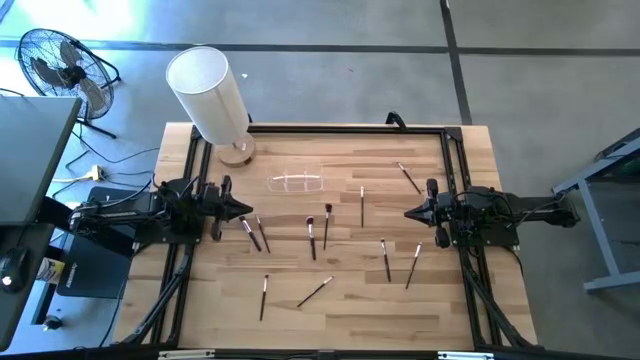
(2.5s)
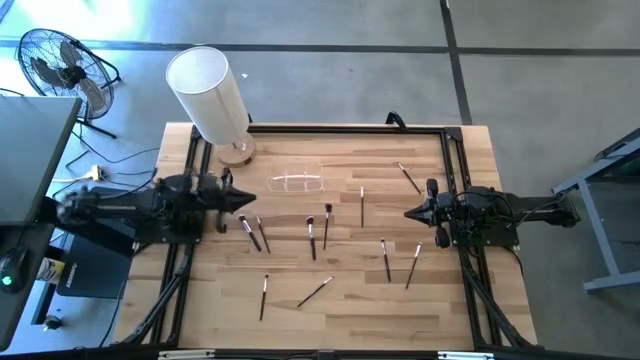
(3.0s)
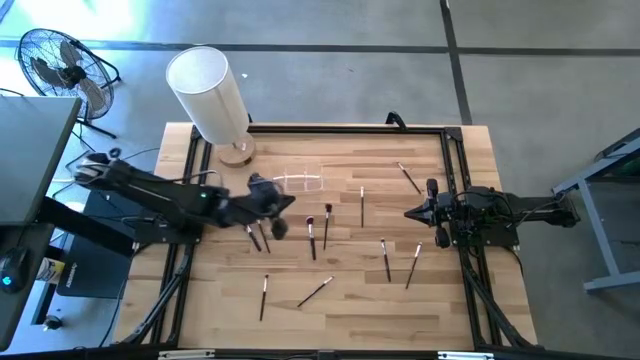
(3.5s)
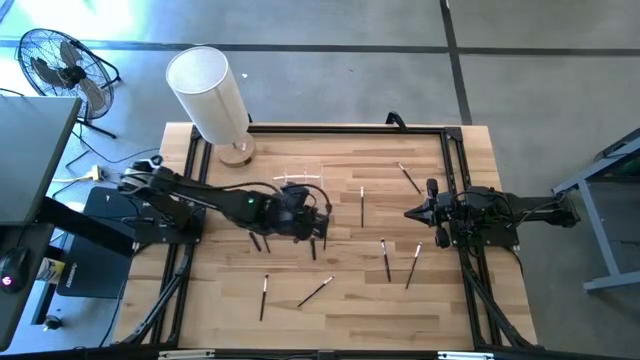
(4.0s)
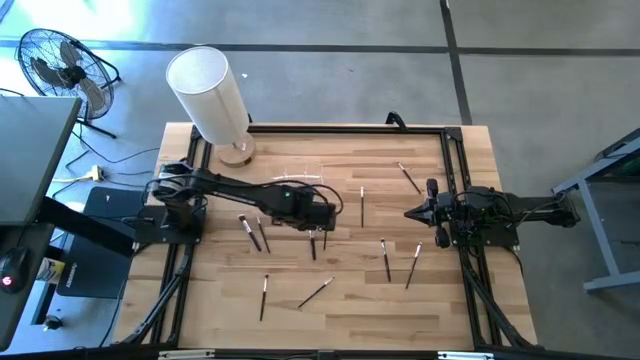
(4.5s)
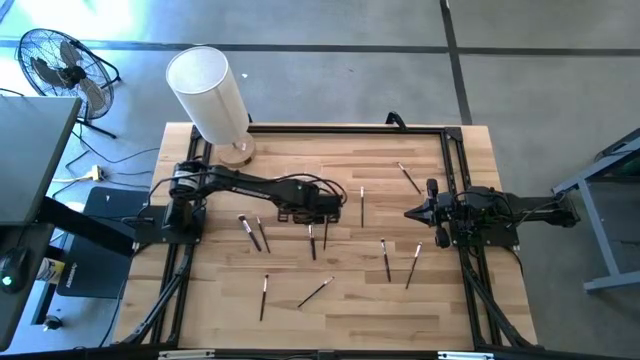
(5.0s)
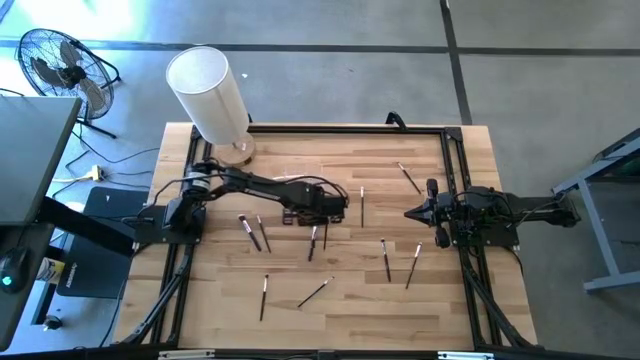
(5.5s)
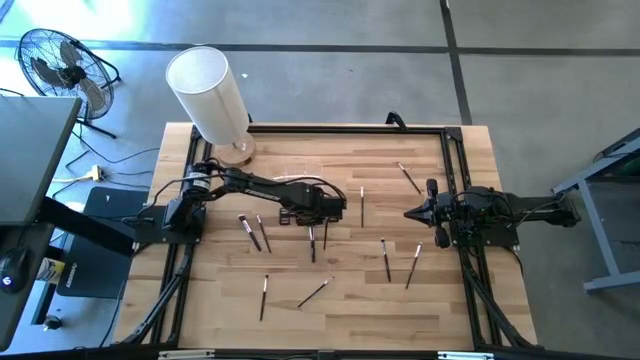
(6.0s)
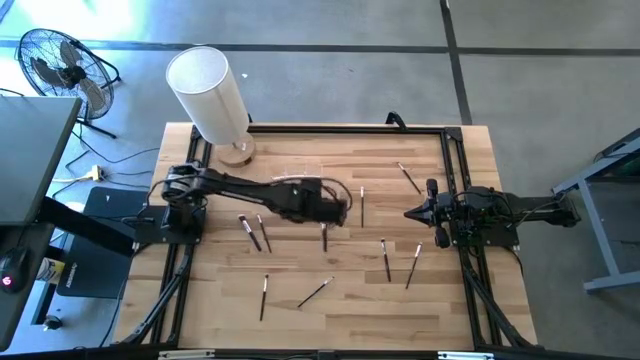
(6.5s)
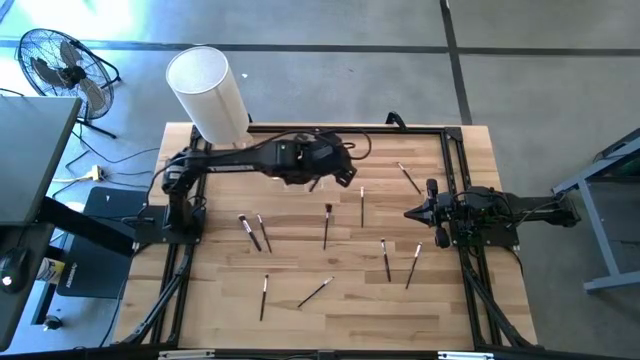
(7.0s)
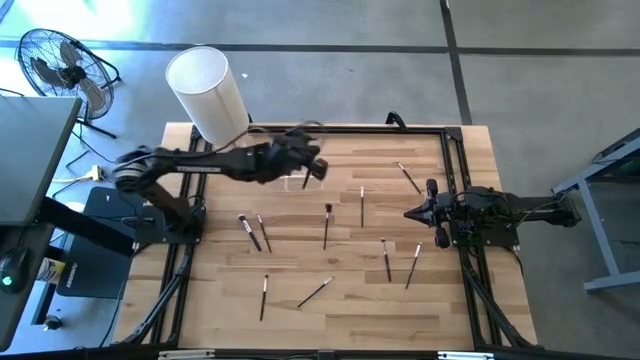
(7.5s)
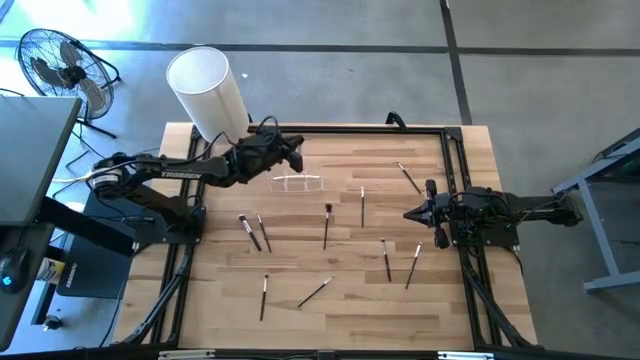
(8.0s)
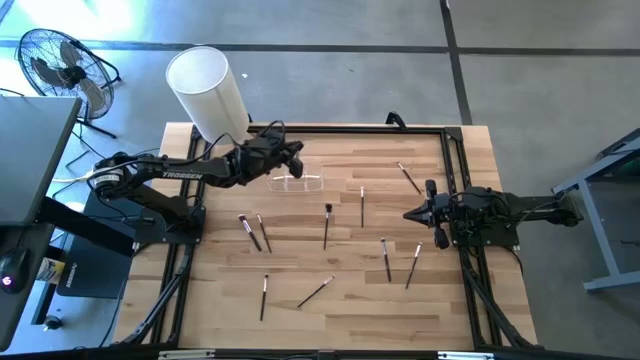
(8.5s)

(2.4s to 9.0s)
Task: Pick & Place Makeup Supplies
Put the black makeup brush into the transparent organizer

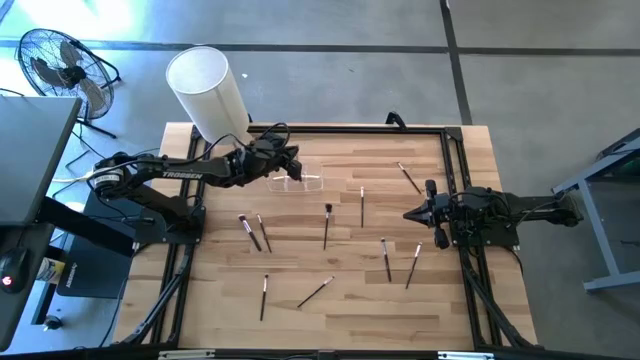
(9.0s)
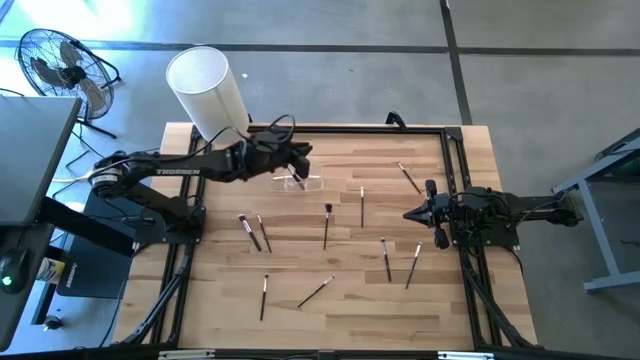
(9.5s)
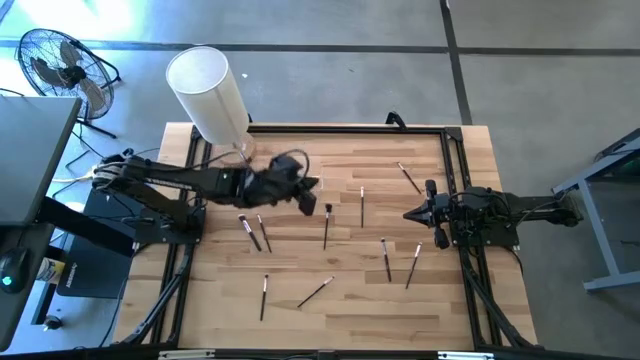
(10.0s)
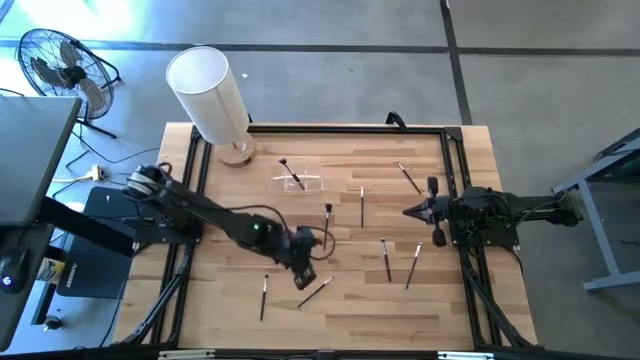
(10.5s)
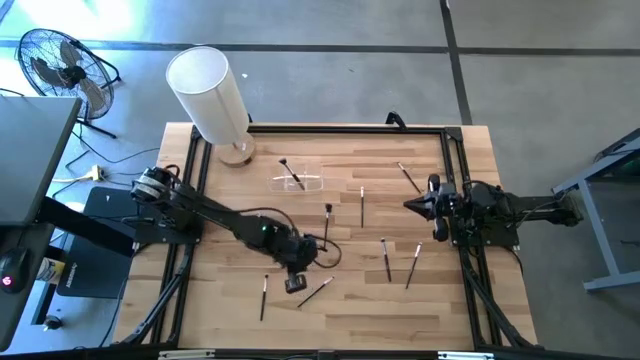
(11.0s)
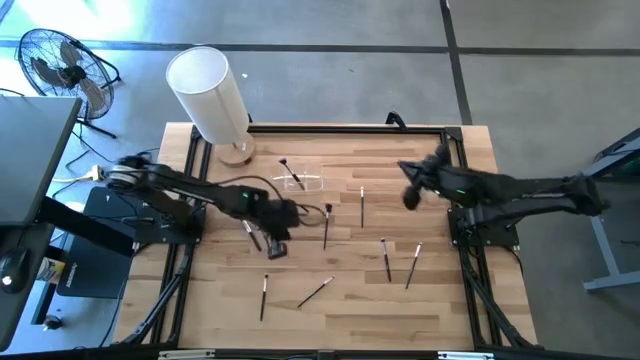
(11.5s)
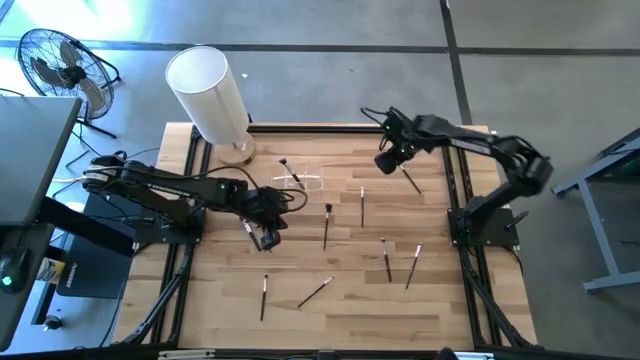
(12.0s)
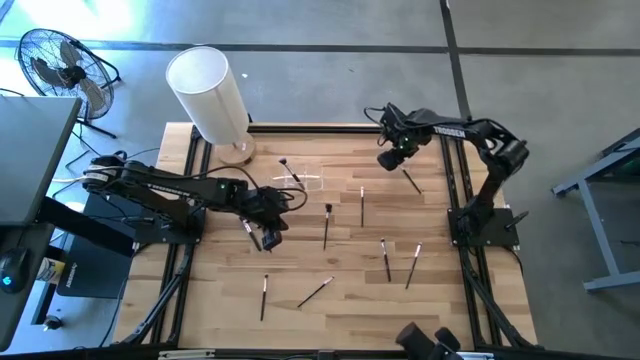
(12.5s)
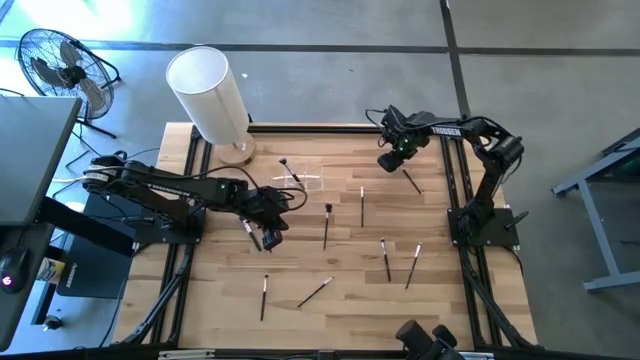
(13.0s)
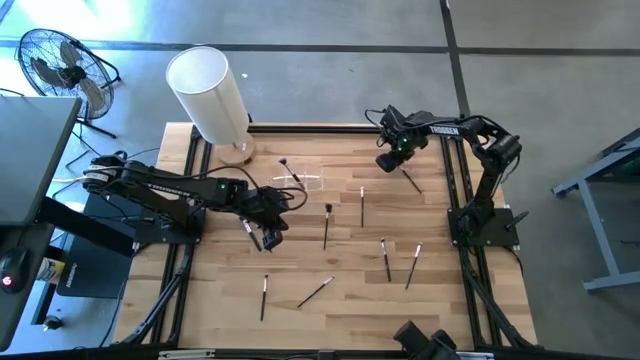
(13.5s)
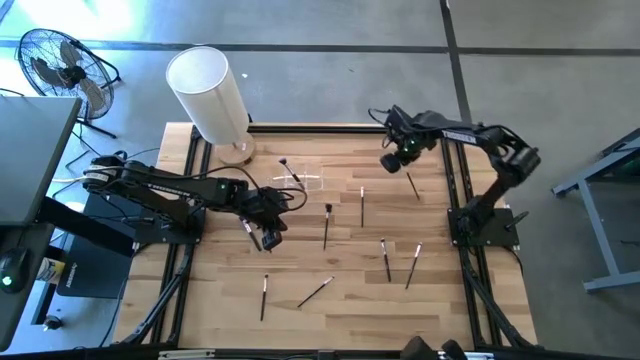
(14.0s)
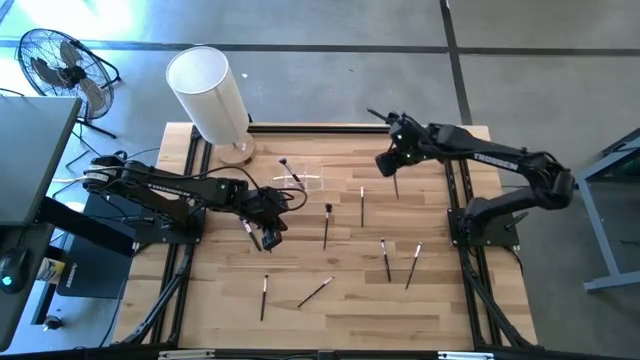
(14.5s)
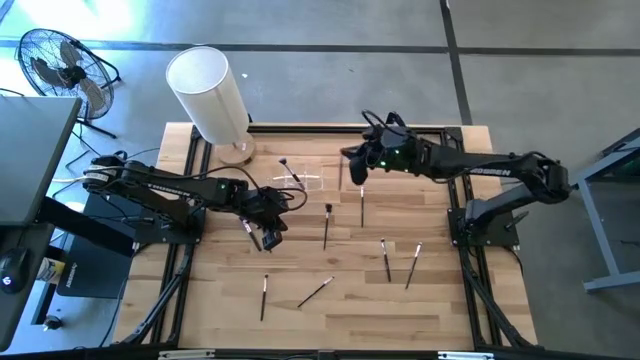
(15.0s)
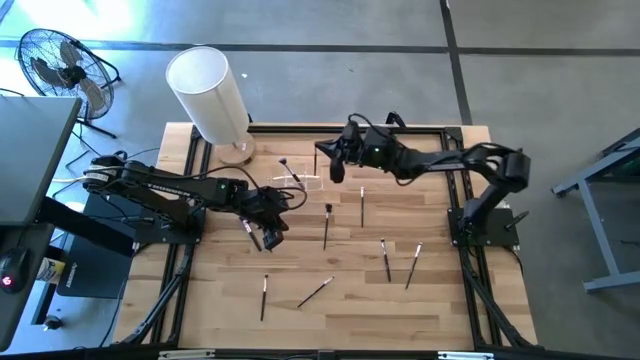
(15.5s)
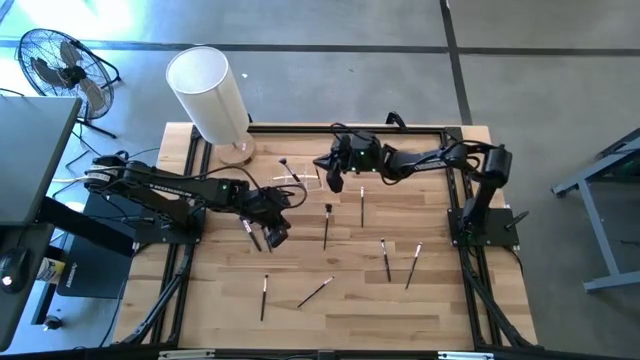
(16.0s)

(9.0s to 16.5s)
Put the black makeup brush into the transparent organizer

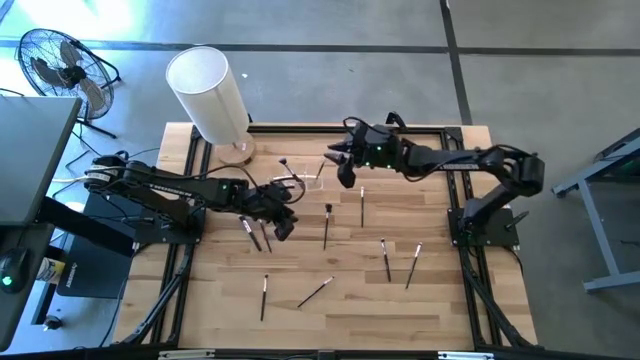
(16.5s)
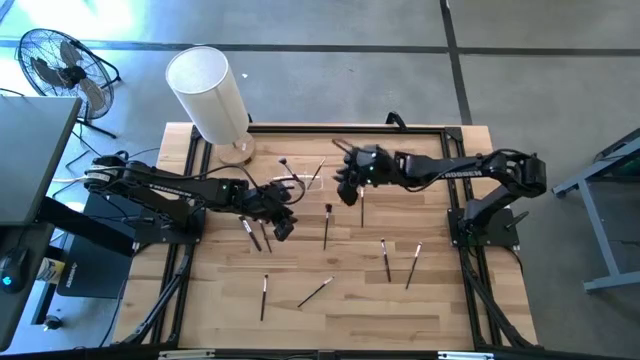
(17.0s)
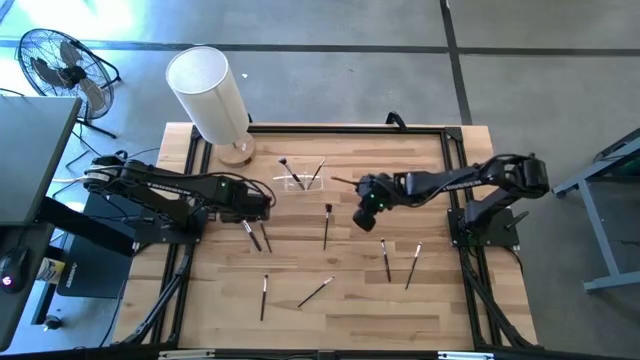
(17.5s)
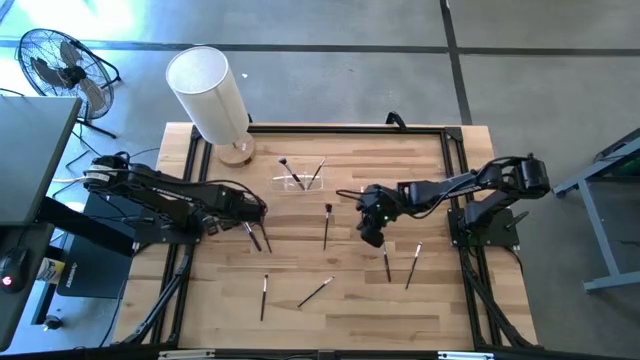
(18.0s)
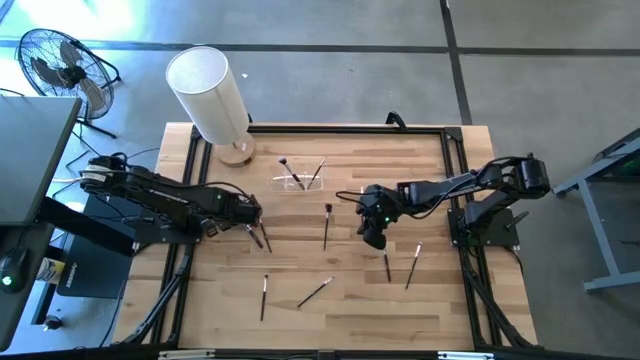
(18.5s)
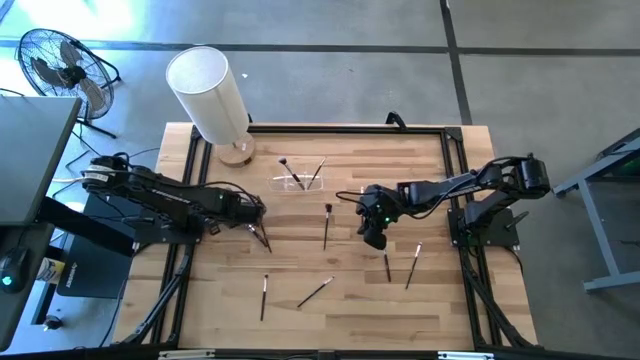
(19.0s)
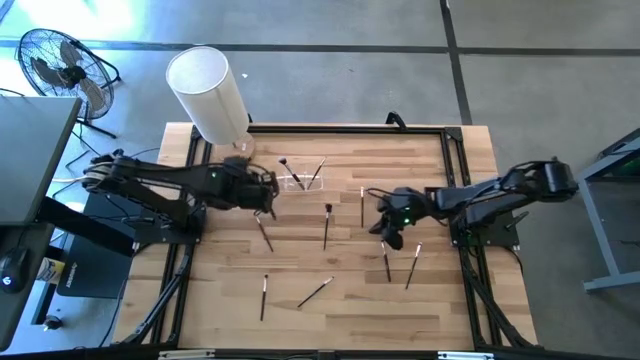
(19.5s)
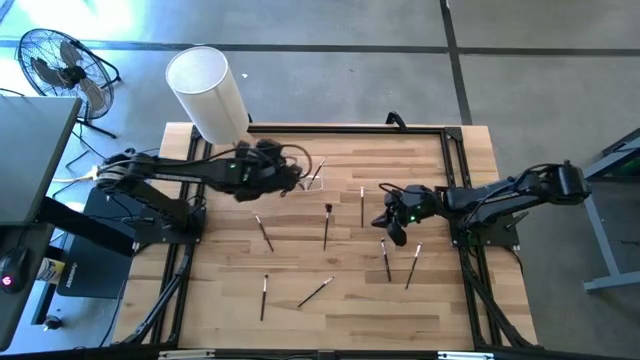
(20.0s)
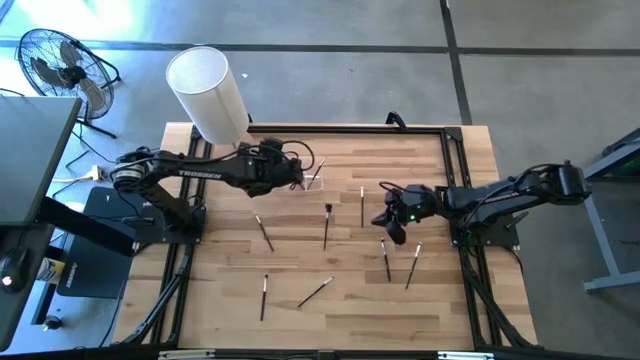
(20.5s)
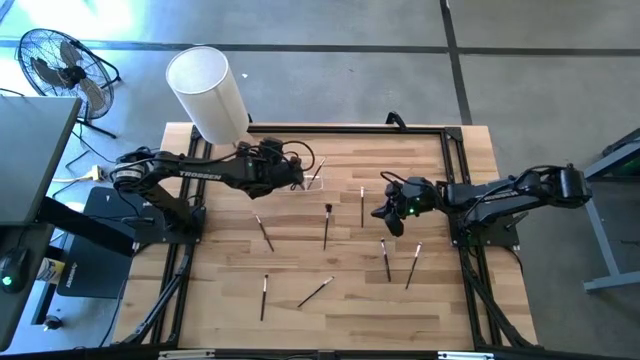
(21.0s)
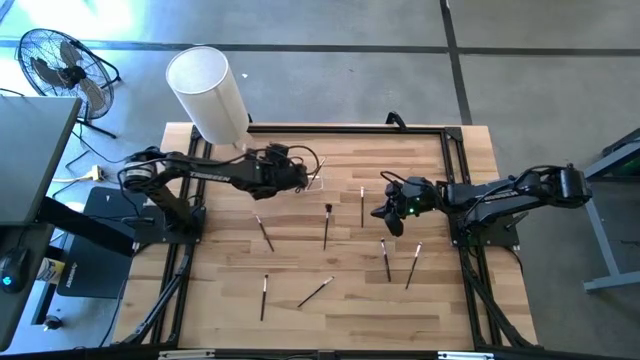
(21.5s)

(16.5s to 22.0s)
Put the black makeup brush into the transparent organizer

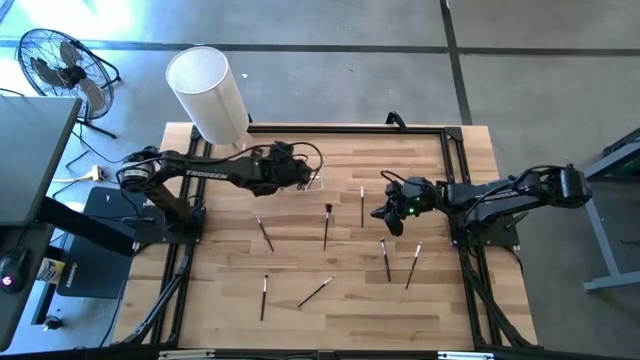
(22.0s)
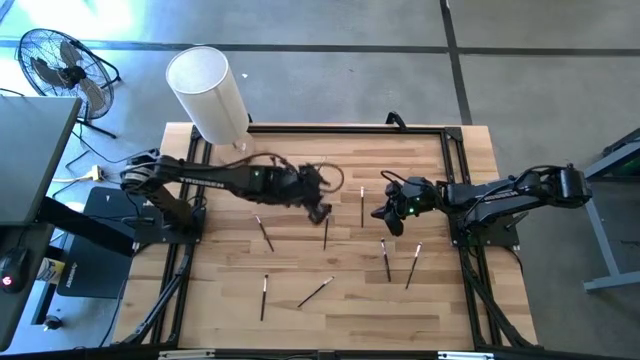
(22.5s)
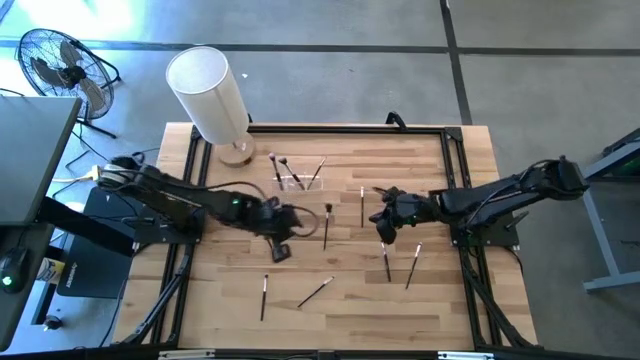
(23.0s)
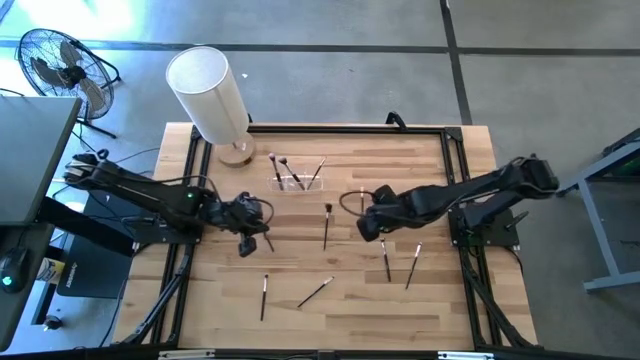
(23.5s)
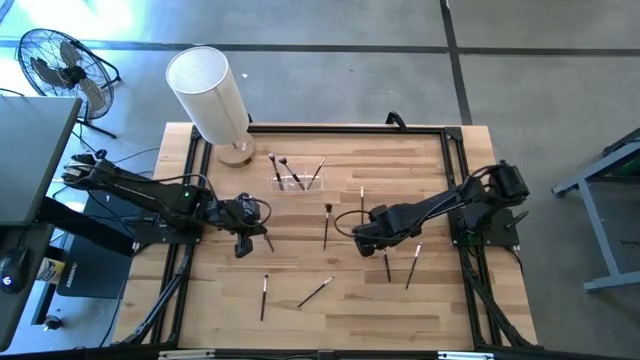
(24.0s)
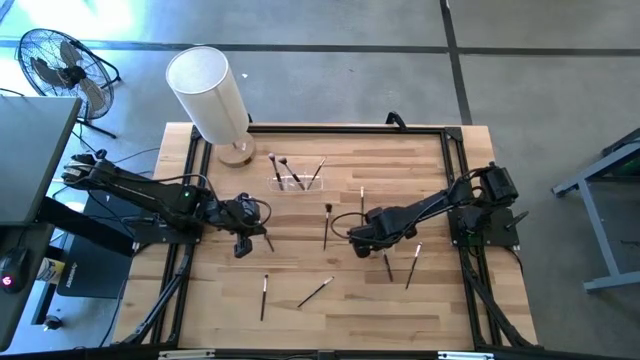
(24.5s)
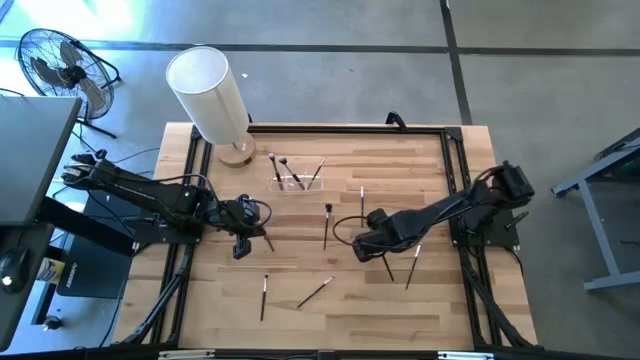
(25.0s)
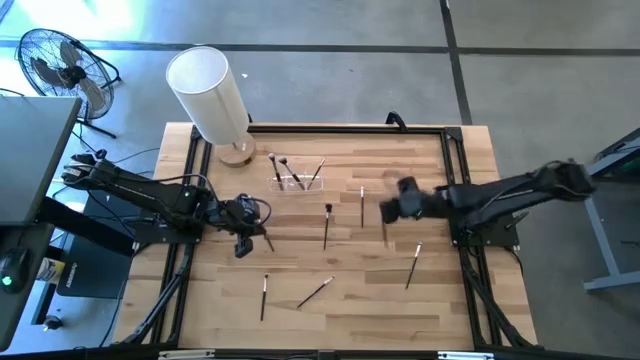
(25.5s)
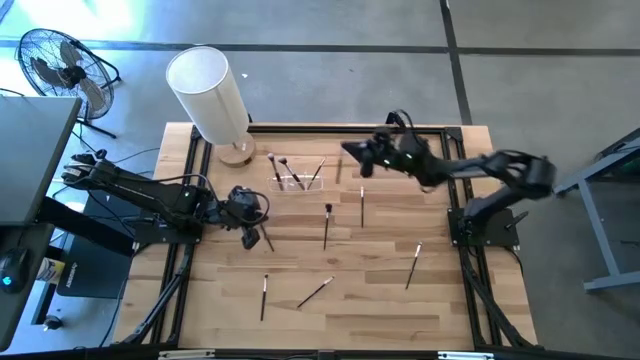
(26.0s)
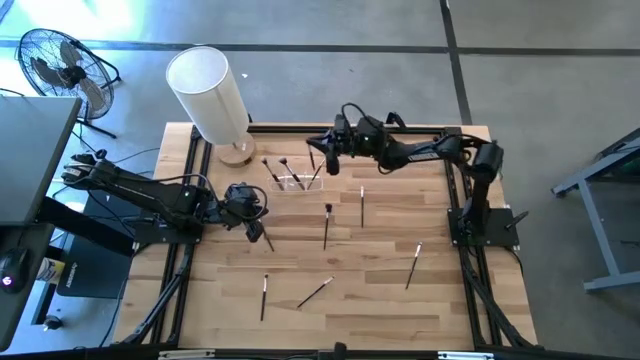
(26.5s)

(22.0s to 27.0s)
Put the black makeup brush into the transparent organizer
